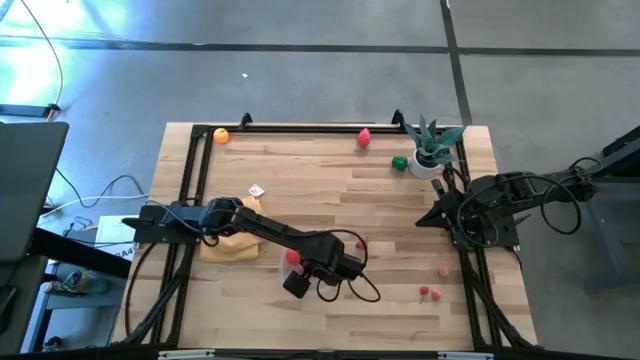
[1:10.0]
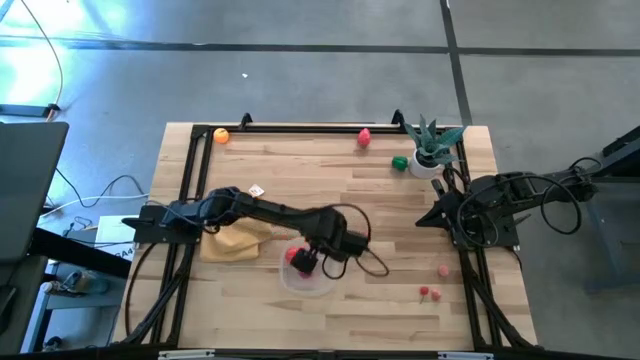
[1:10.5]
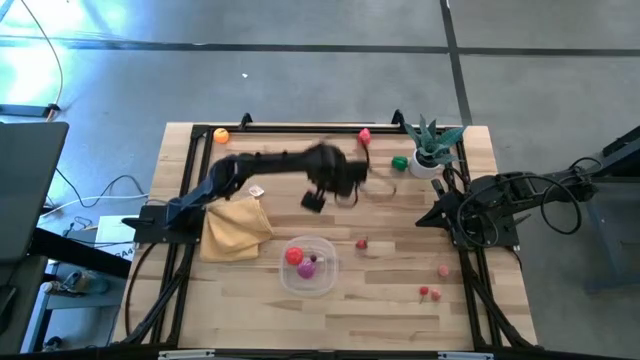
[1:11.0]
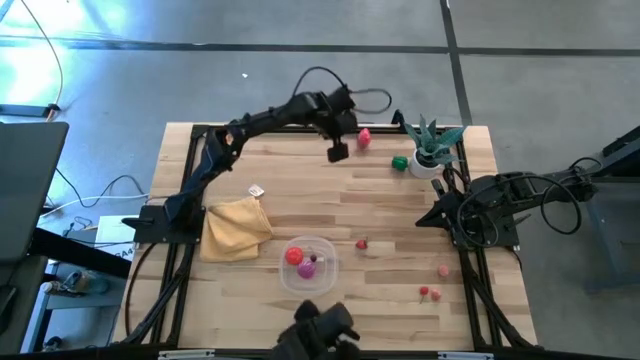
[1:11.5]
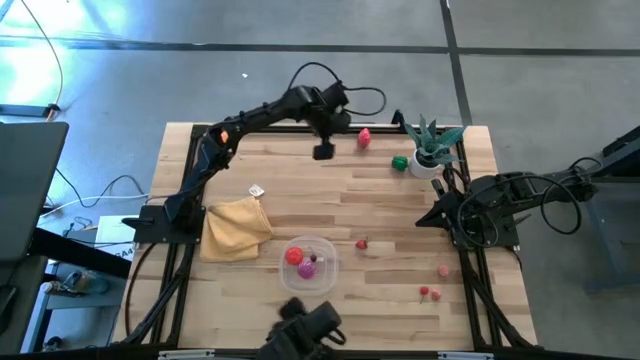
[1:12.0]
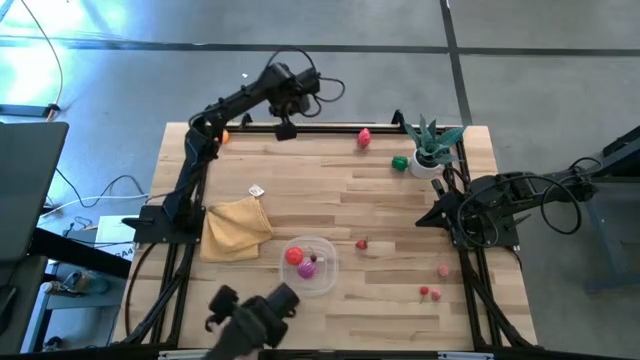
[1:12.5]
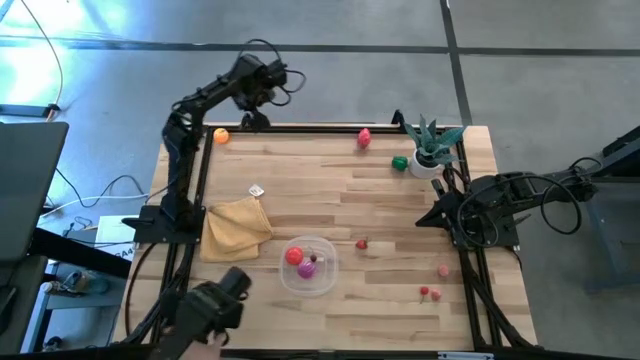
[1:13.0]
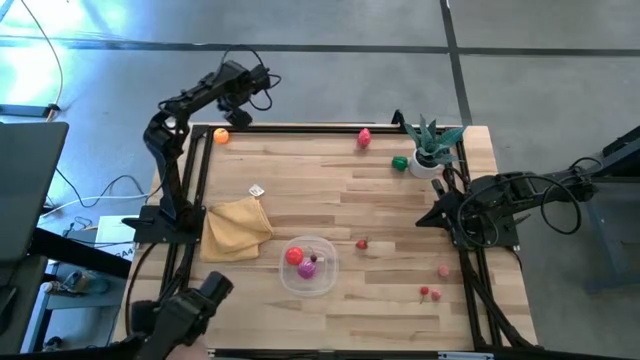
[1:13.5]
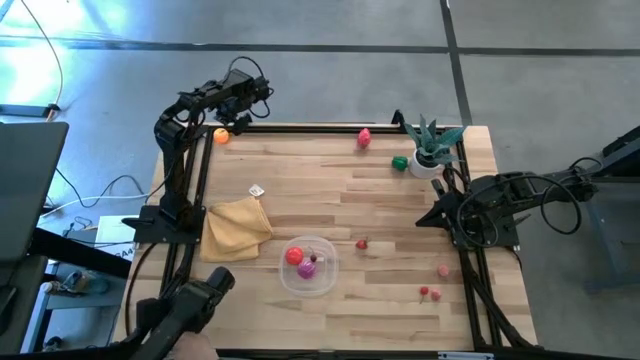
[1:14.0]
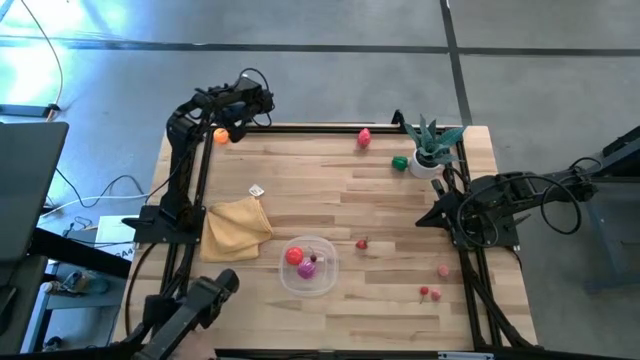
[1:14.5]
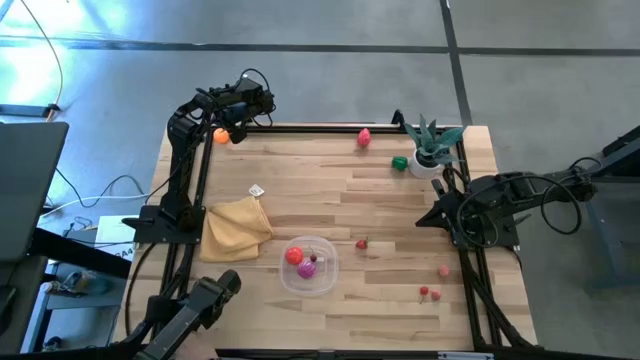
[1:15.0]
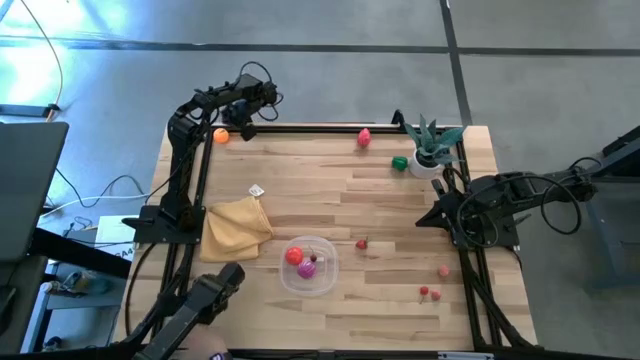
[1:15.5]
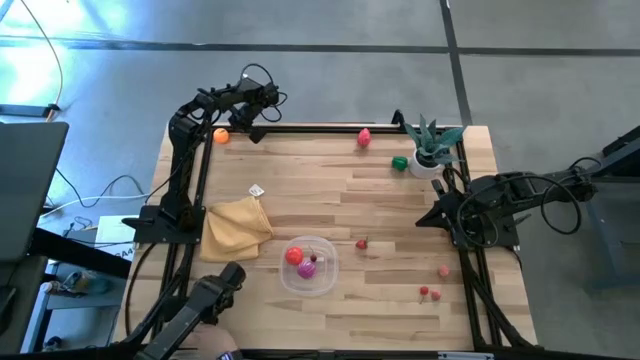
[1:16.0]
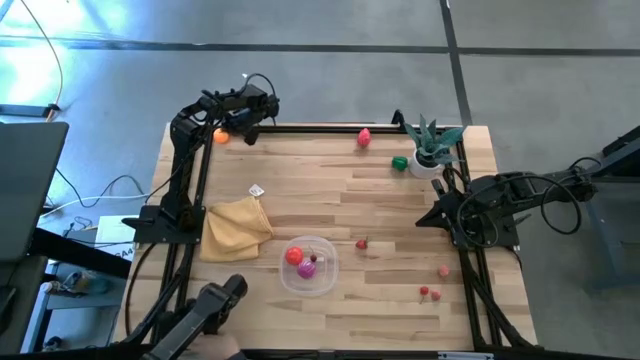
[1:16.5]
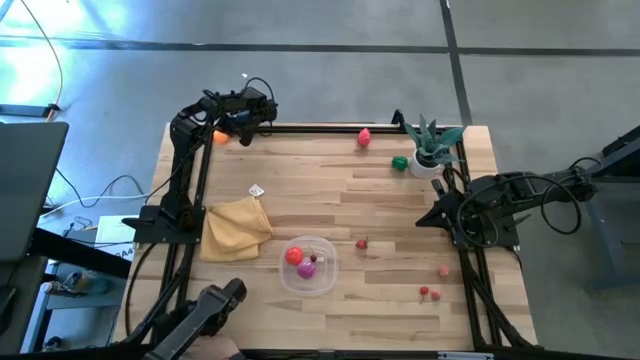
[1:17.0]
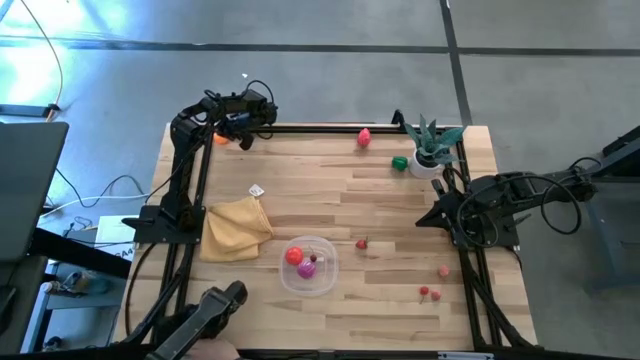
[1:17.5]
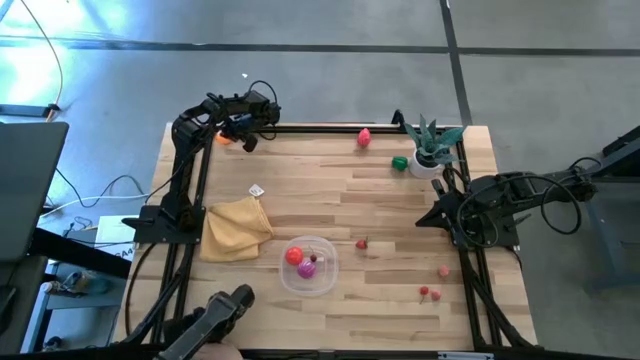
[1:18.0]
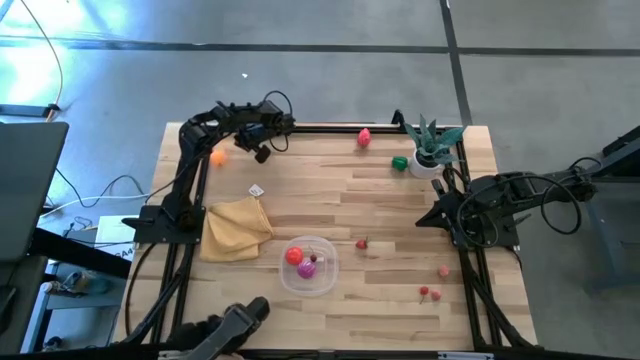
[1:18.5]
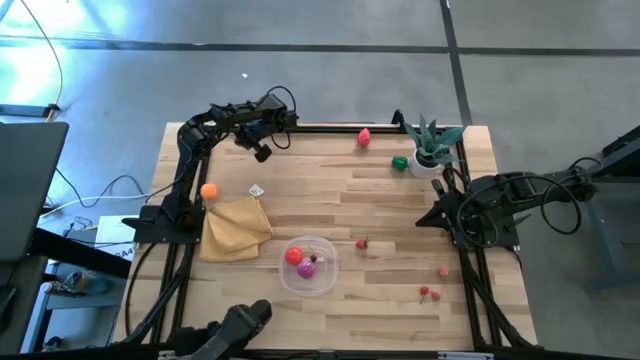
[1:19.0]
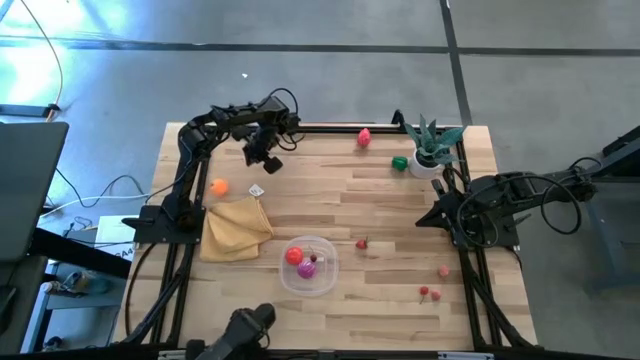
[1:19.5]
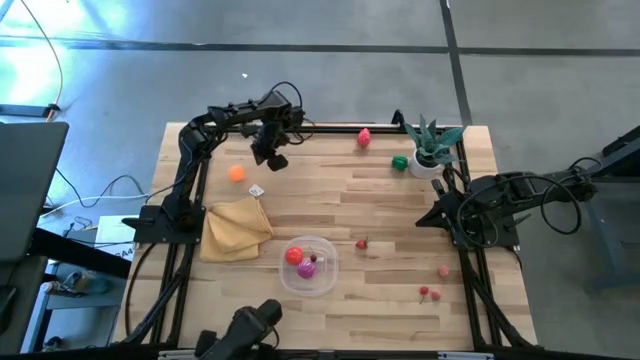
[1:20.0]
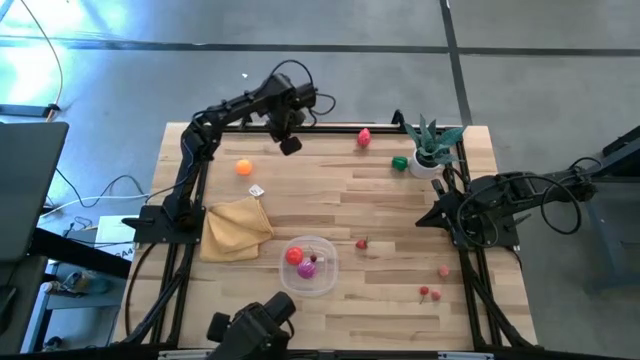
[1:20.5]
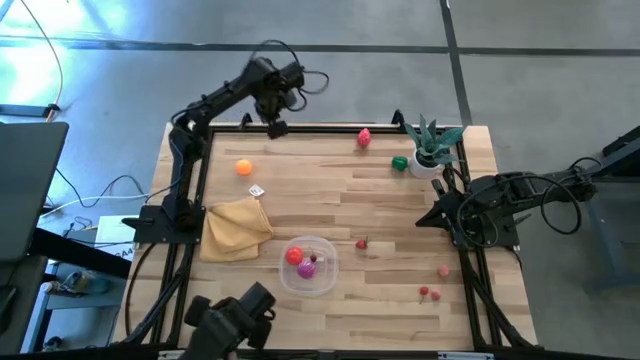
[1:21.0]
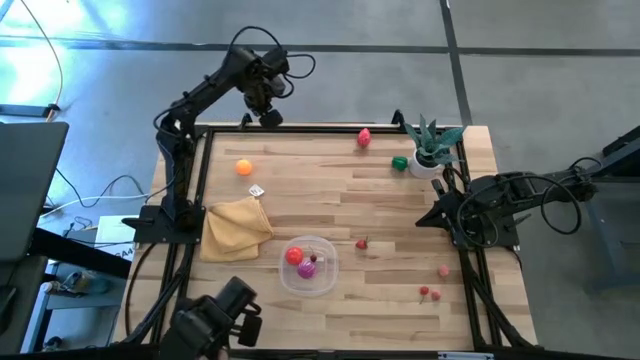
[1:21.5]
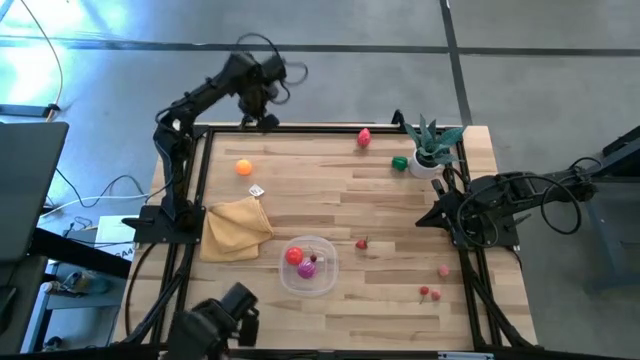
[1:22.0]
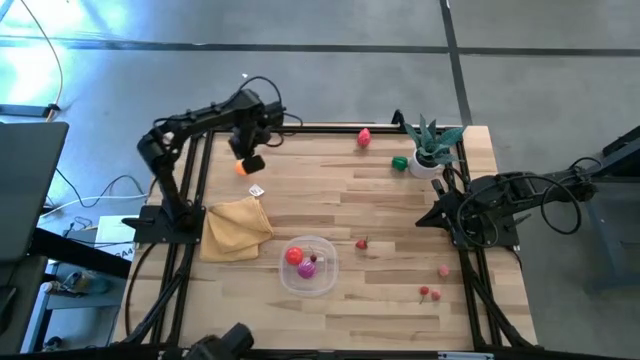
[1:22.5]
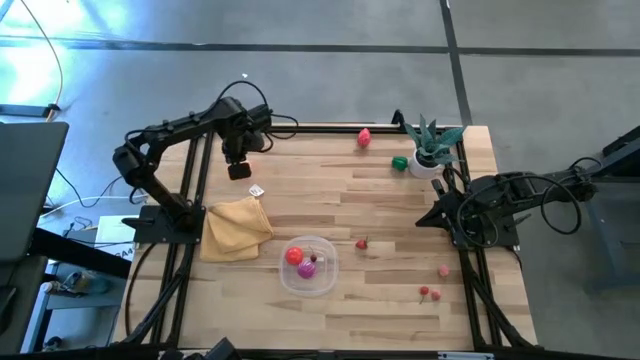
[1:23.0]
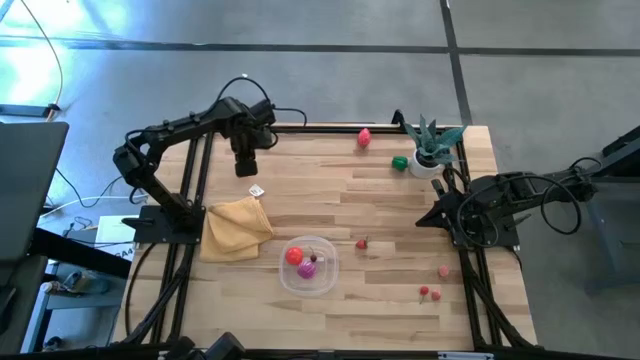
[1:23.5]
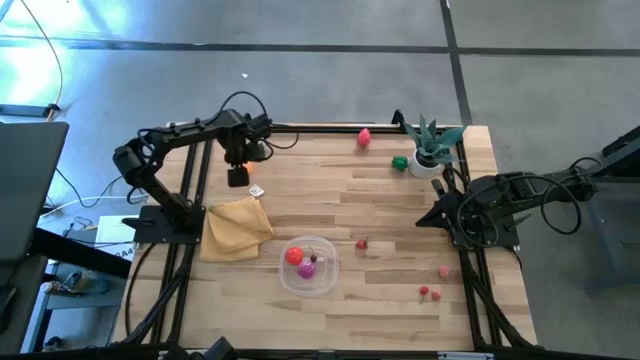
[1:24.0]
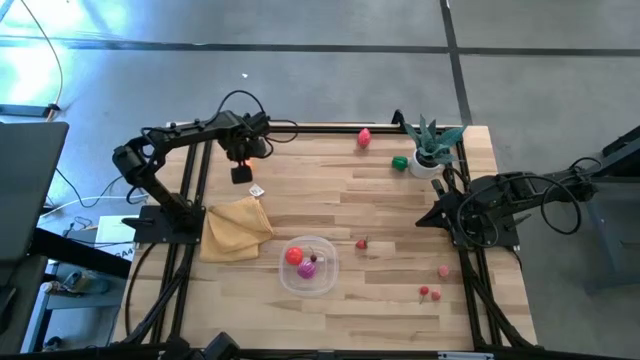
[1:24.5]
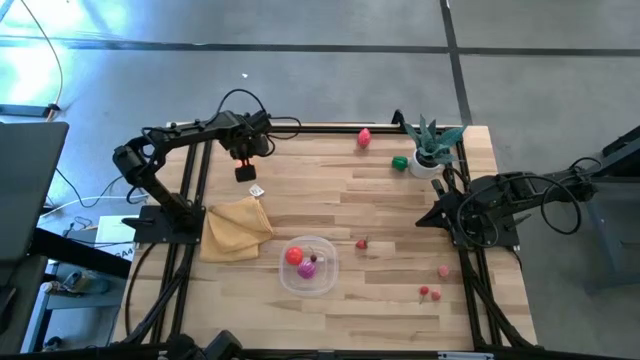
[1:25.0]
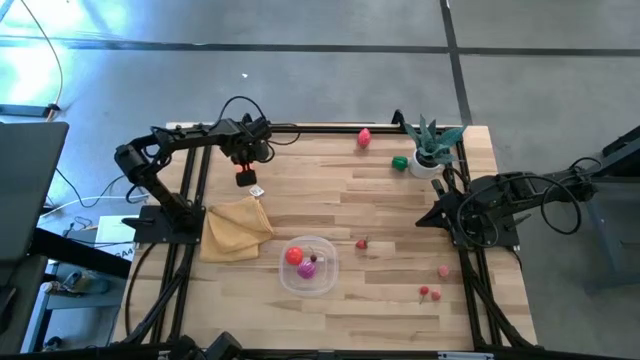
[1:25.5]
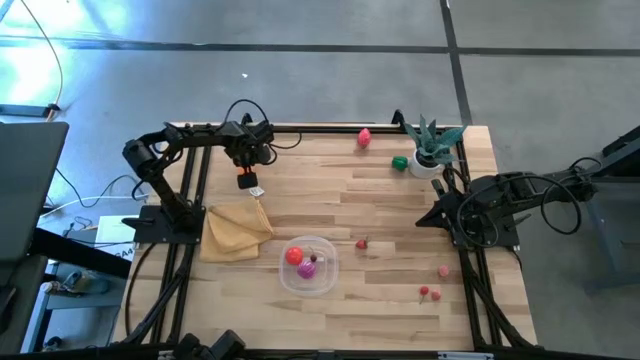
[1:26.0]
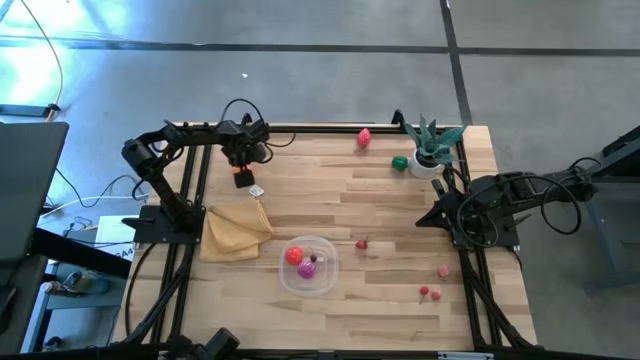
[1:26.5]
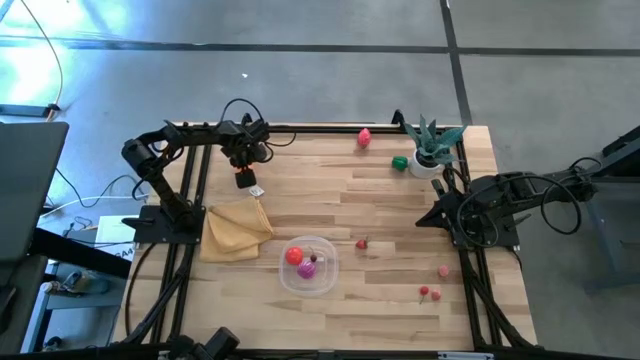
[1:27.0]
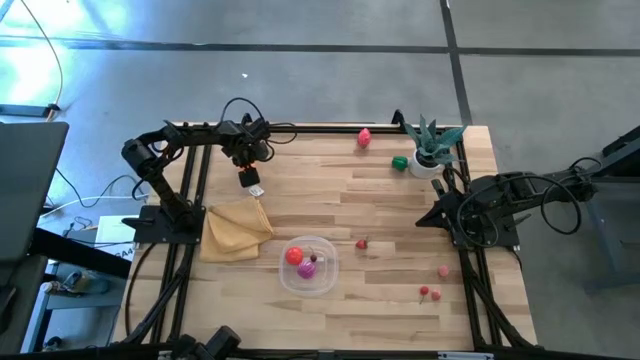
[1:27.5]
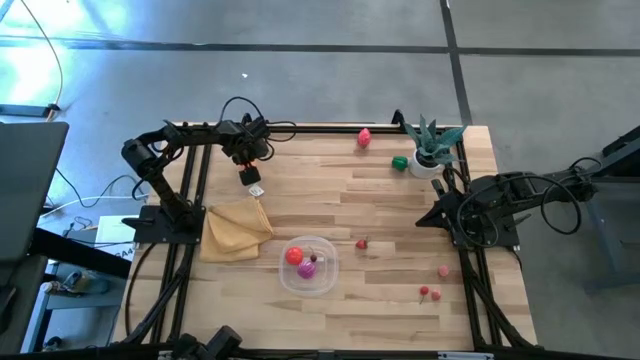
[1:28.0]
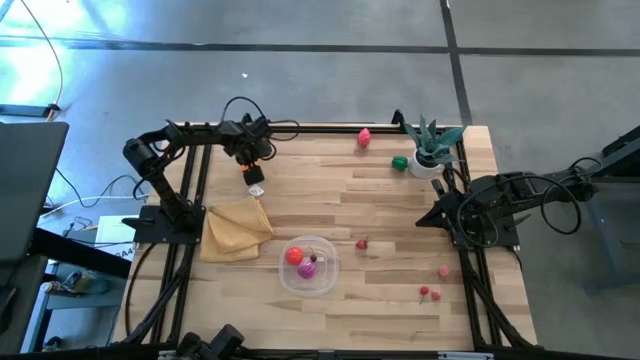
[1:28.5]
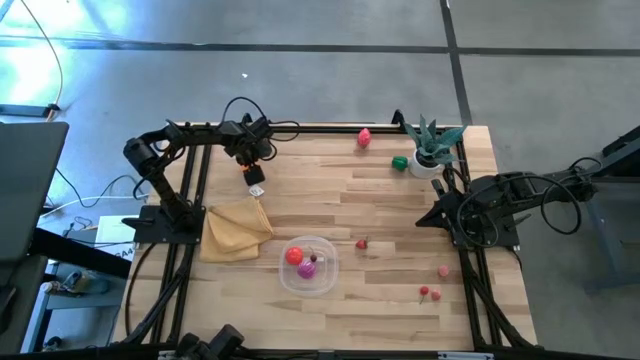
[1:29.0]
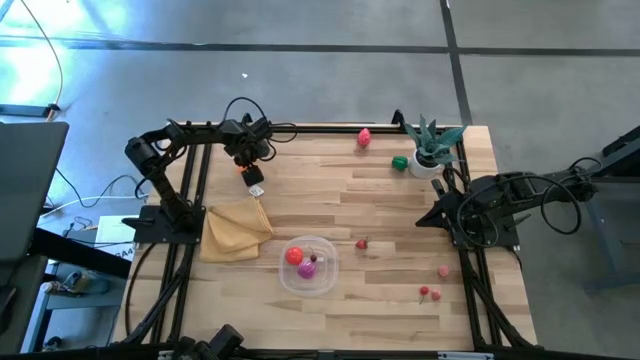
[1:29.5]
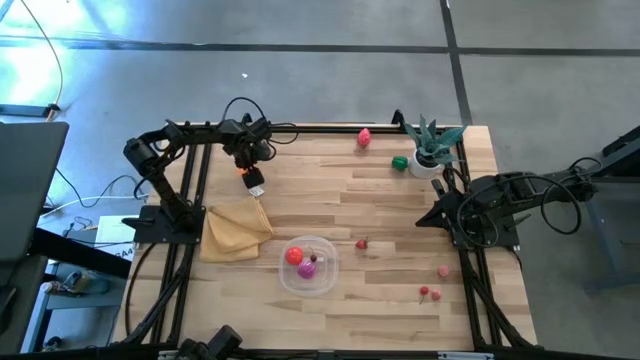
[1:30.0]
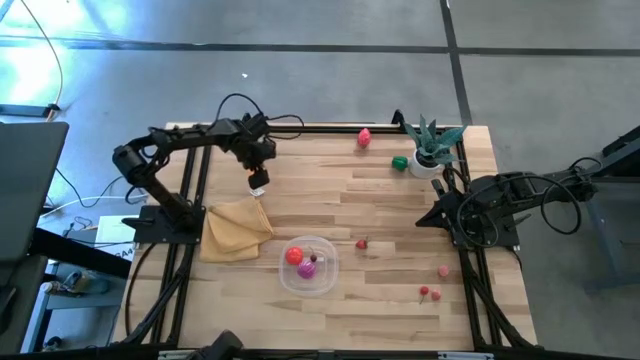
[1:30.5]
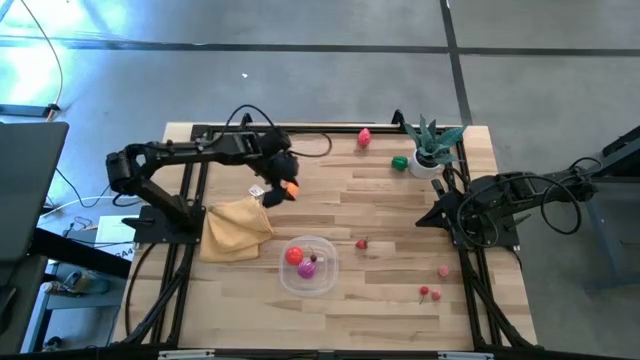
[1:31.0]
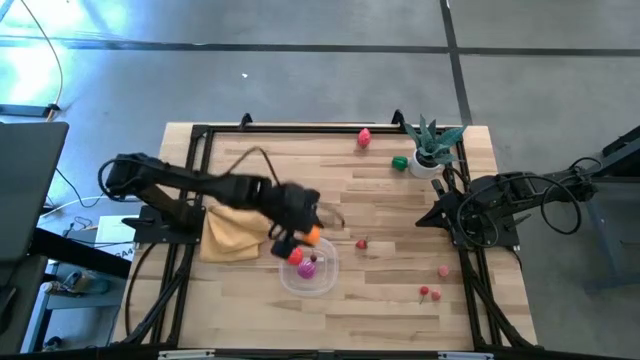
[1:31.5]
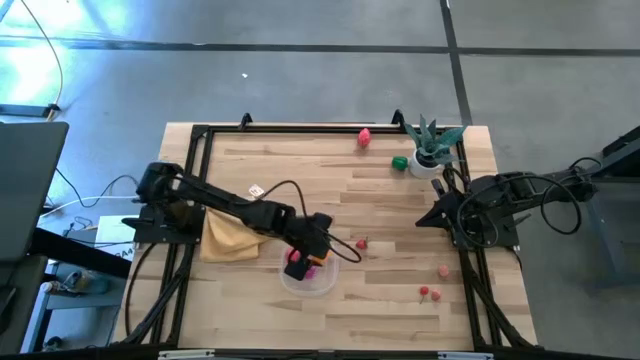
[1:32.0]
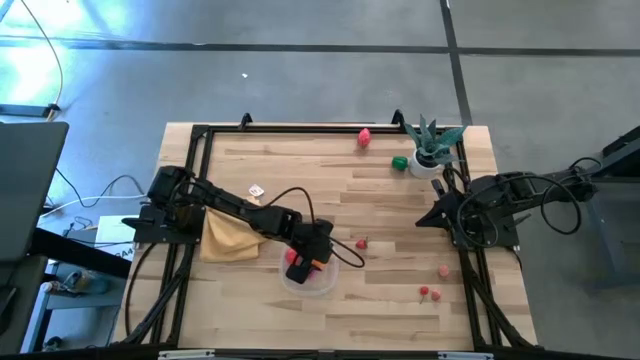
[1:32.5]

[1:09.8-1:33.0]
Task: Pick and placing Produce into tupperware
Put the orange into the transparent bin
